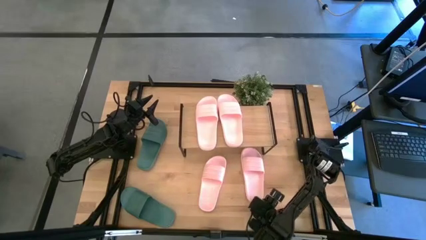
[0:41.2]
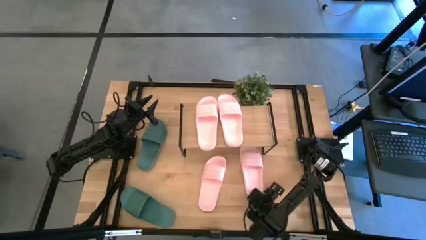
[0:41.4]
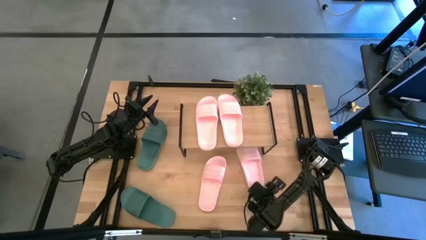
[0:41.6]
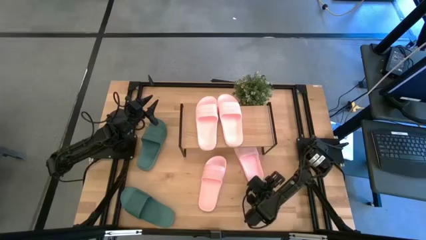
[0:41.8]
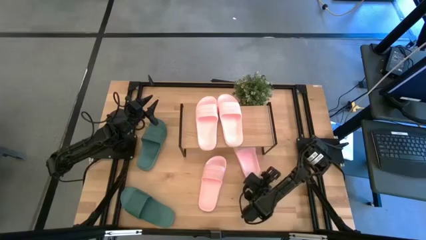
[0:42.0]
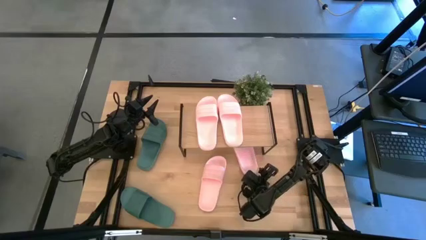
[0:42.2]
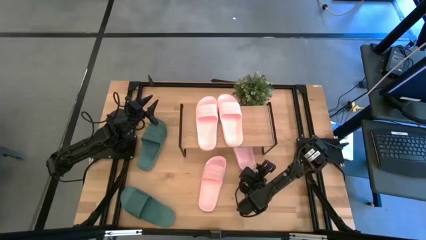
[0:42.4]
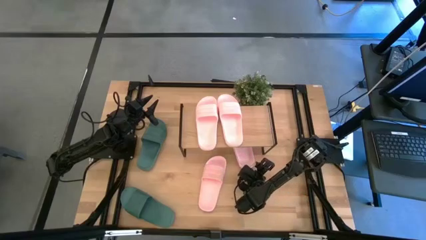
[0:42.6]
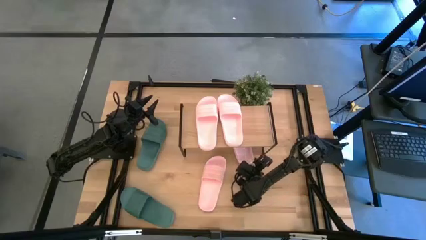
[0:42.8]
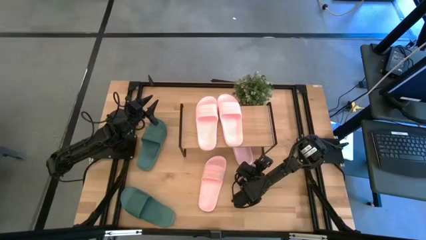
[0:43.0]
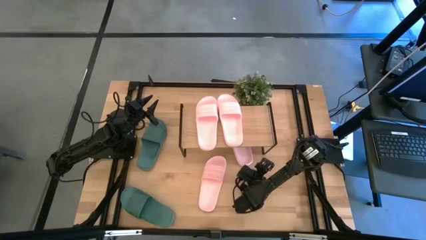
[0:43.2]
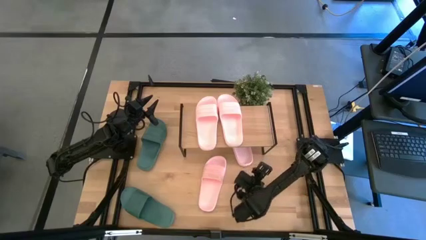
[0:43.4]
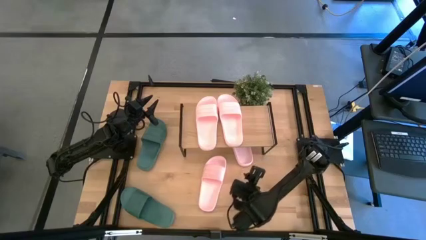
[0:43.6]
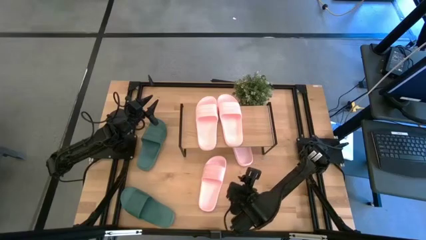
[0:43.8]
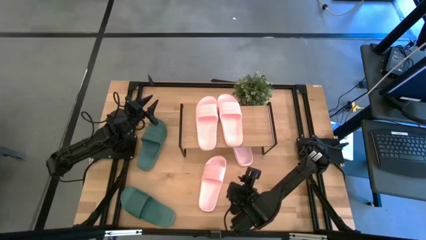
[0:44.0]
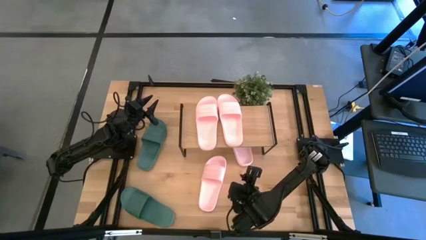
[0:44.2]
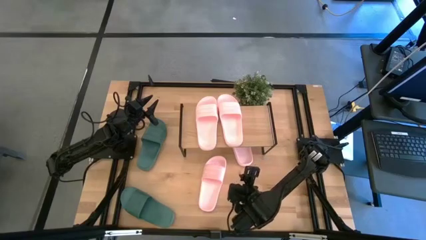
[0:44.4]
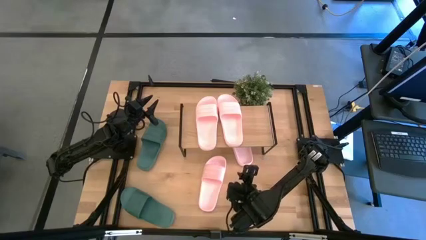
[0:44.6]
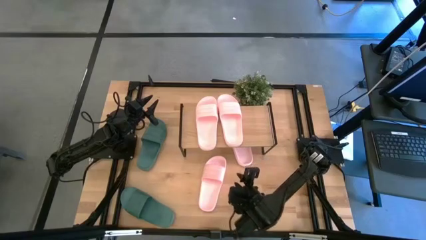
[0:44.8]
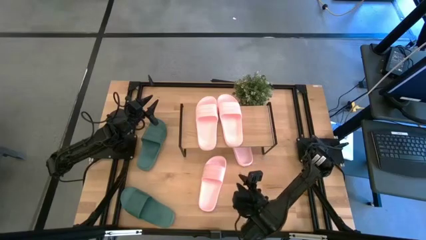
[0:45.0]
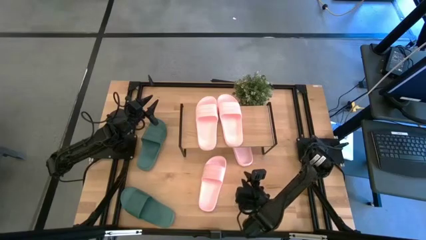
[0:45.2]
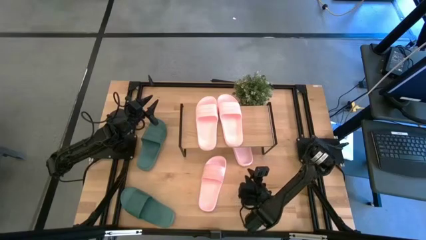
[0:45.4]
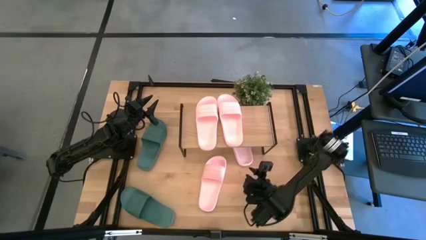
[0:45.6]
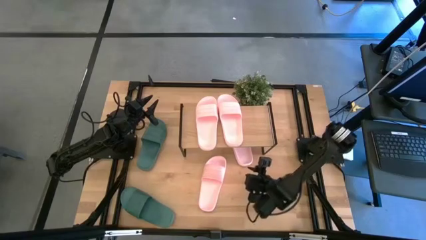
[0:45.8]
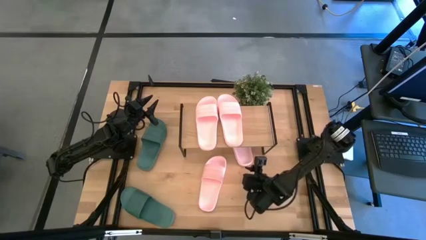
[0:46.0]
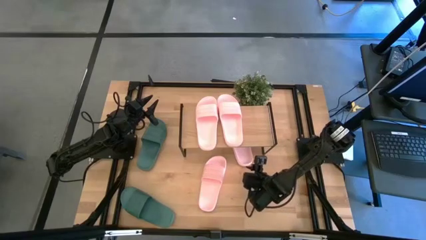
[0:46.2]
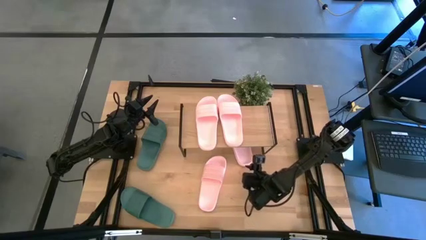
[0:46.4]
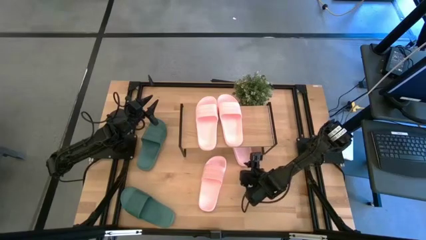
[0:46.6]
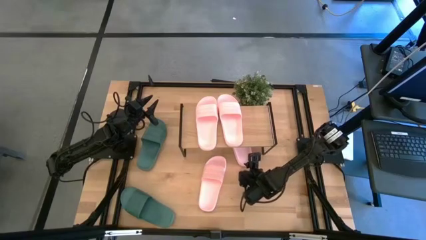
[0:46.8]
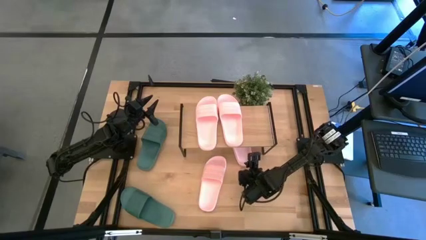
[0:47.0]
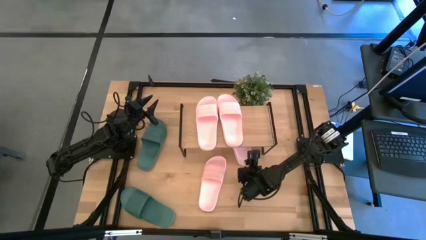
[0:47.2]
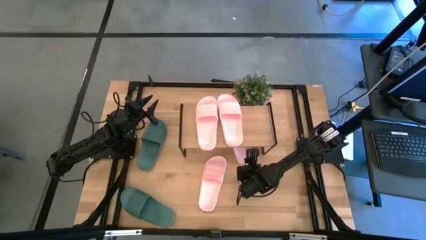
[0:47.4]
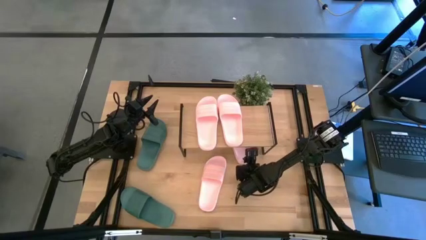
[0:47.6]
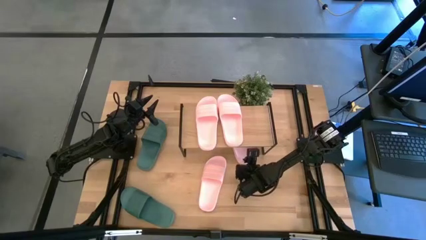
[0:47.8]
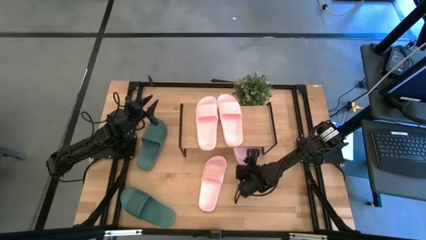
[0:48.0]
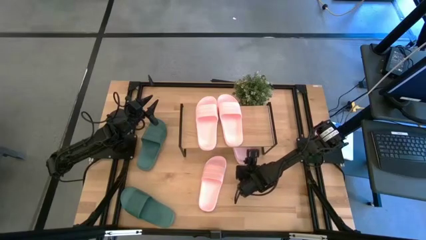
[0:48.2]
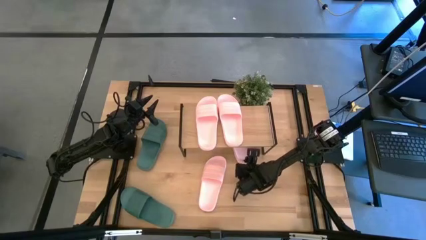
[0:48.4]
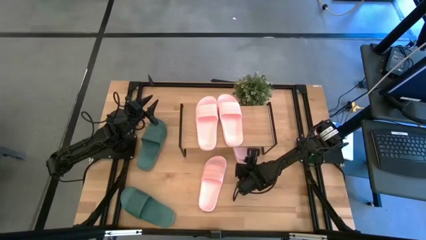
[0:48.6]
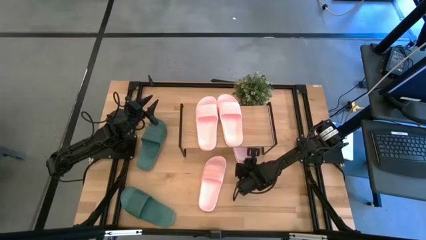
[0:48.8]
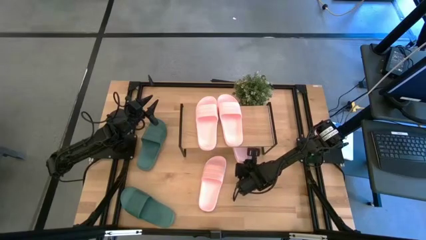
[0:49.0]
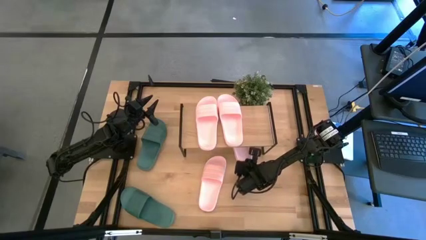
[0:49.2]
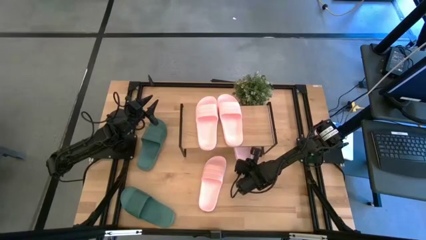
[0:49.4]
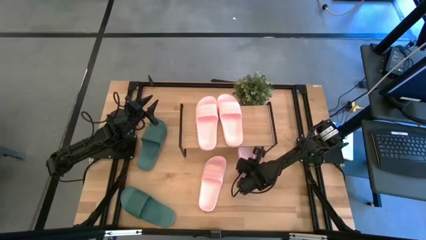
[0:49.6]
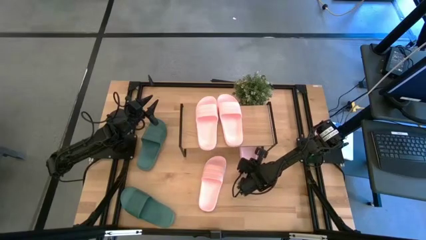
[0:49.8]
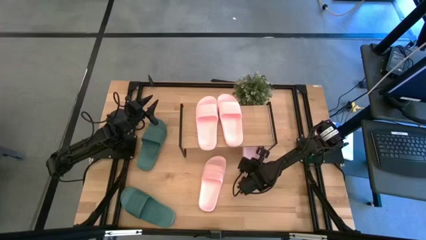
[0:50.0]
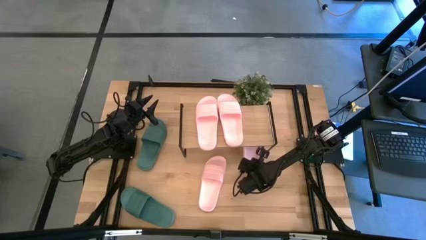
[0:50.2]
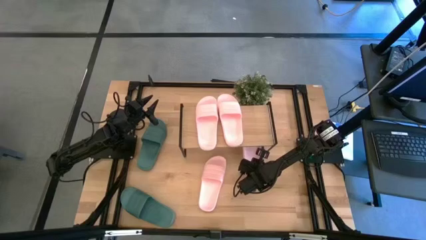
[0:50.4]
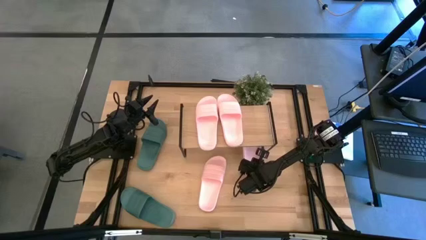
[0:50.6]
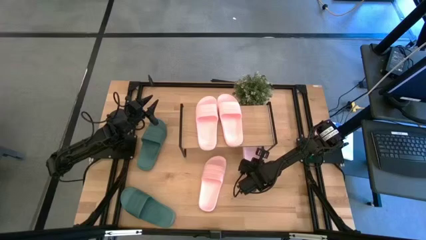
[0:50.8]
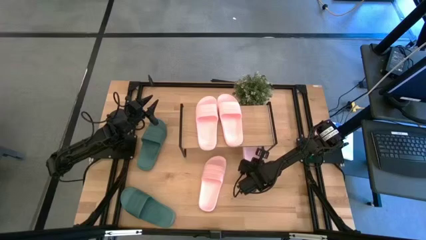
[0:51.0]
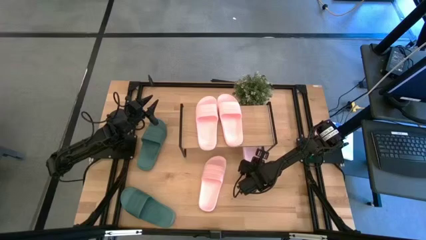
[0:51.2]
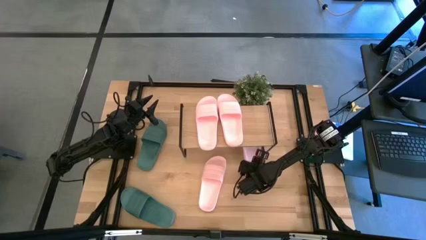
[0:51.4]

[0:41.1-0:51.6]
Task: Pick and place slides into the shelf
Put the pink slide under the shelf

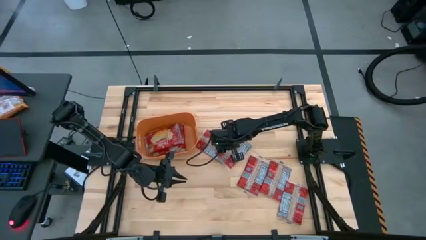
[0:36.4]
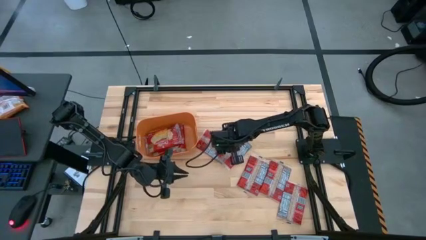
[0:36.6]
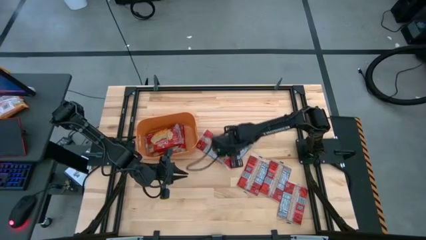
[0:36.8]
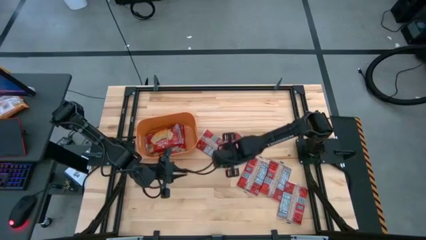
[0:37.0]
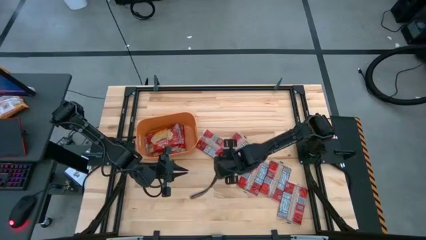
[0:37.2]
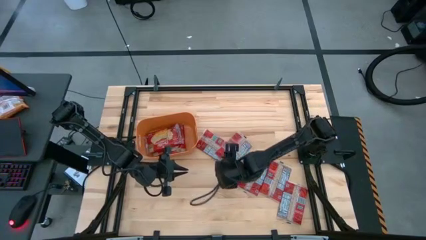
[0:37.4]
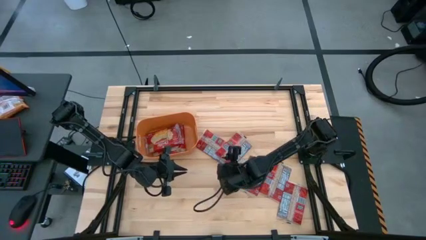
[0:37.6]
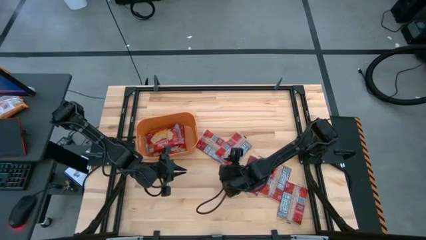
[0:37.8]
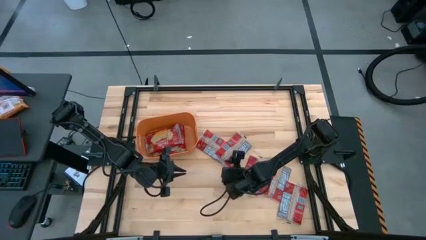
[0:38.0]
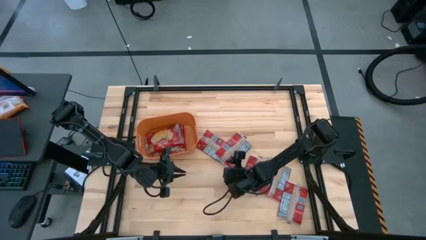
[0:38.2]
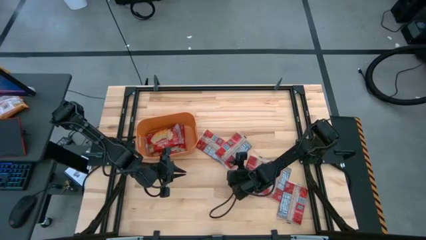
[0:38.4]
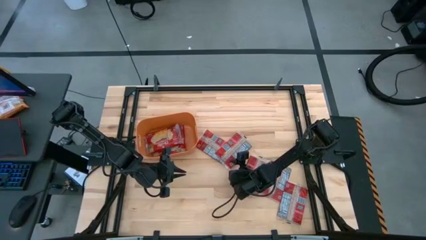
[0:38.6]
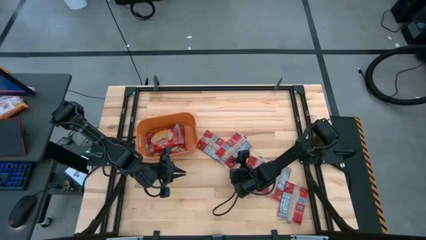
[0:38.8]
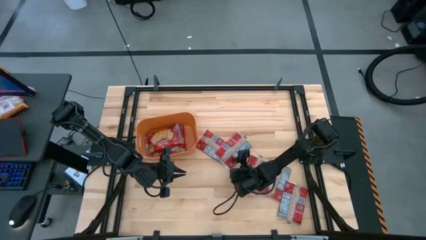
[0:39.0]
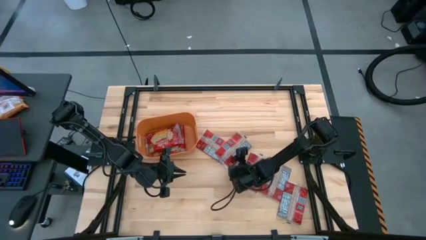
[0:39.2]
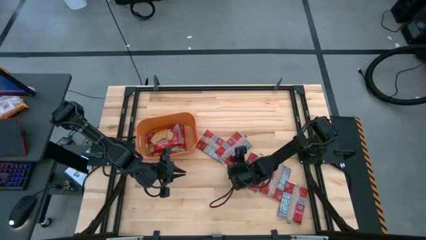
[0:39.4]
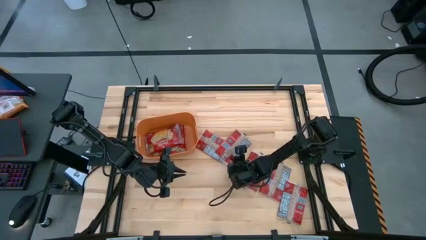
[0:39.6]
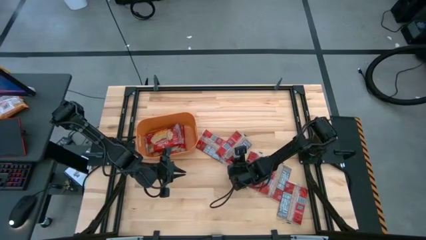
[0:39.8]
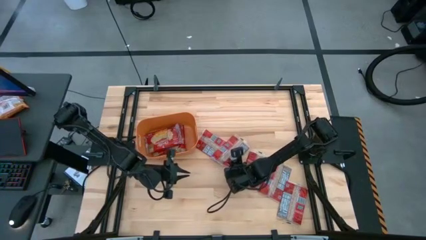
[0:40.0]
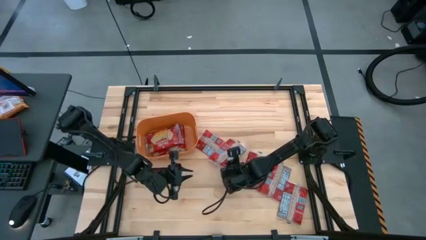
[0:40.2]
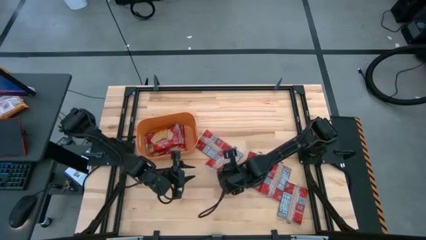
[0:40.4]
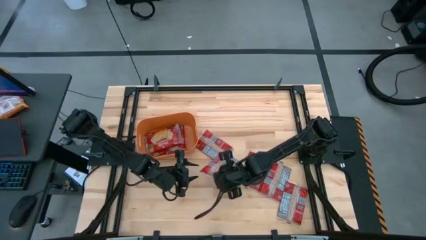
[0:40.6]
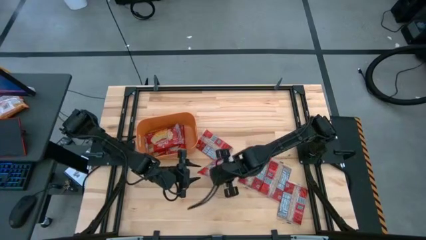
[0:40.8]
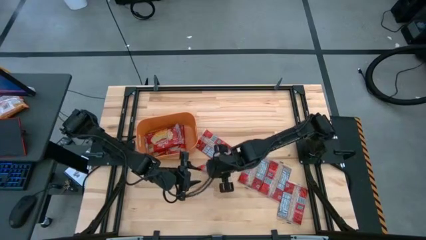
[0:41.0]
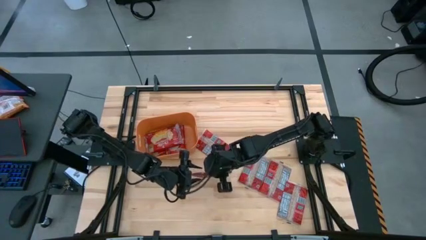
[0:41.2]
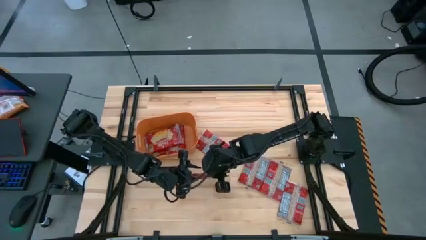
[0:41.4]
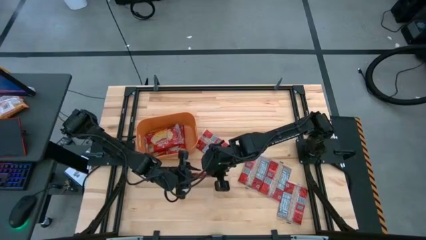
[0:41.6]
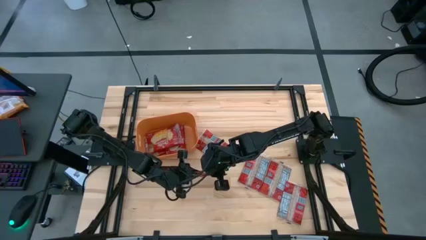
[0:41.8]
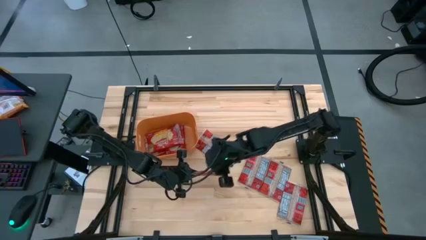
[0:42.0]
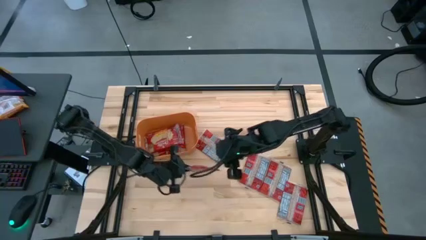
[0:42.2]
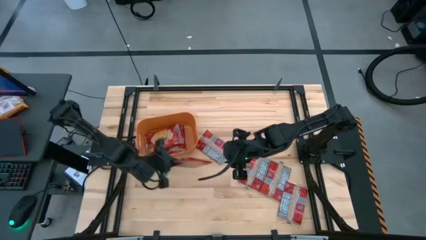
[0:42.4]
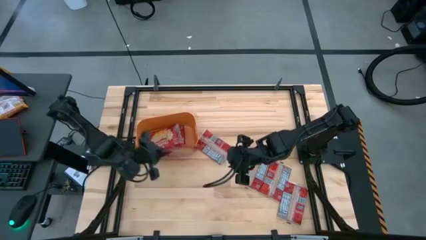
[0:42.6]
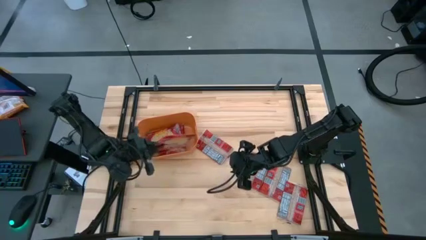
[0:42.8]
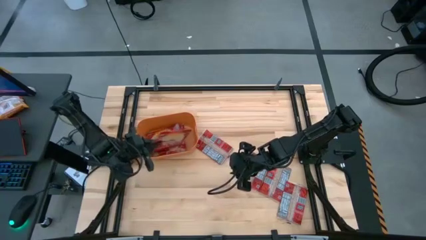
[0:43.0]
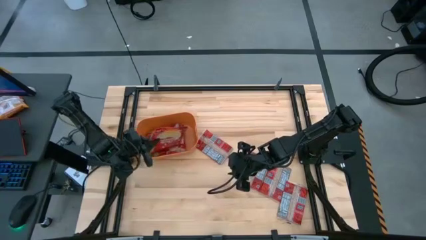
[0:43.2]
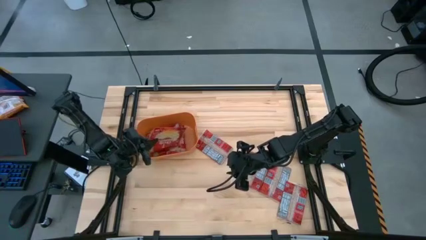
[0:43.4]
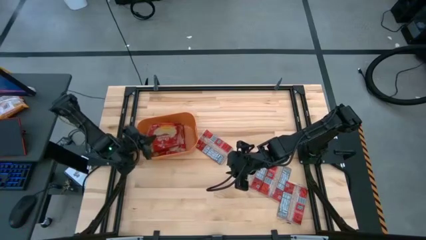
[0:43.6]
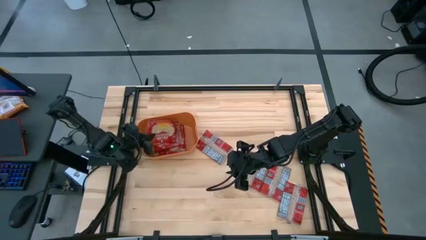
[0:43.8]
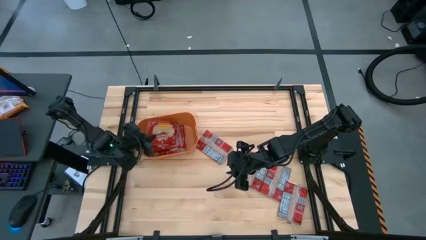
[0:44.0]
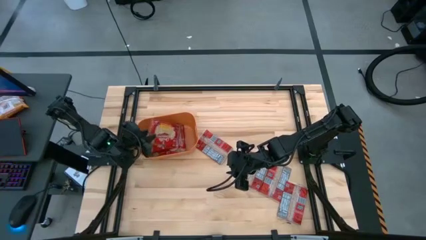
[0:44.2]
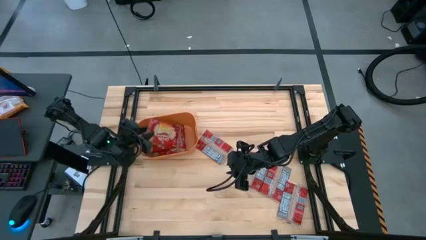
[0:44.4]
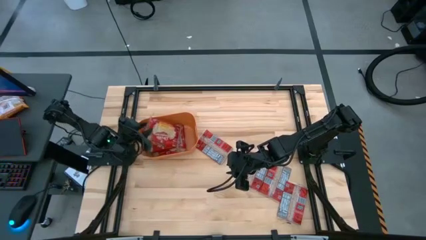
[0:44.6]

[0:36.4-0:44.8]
Task: Sort popcorn bags into baskets
Put the red popcorn bag into the orange bin
